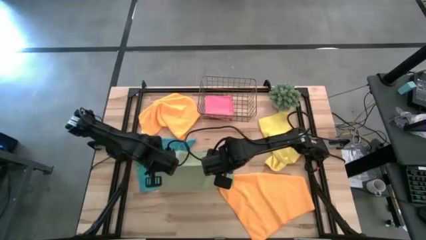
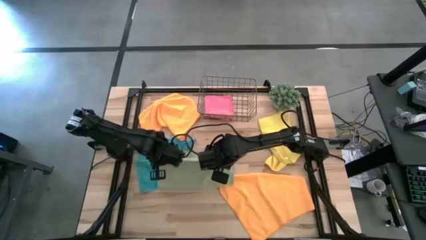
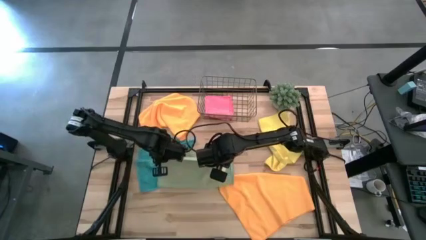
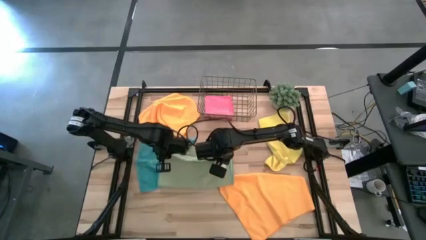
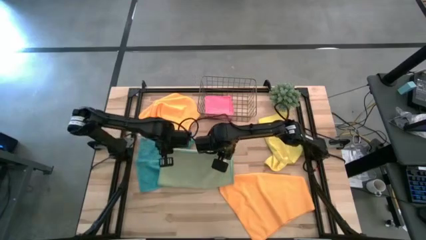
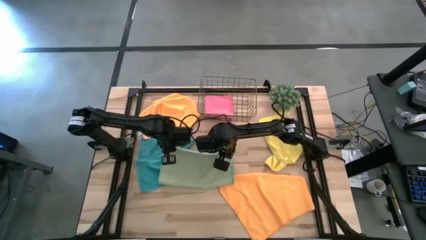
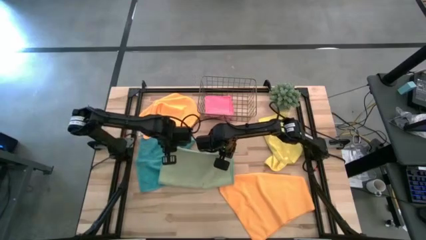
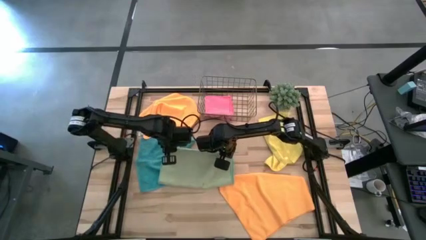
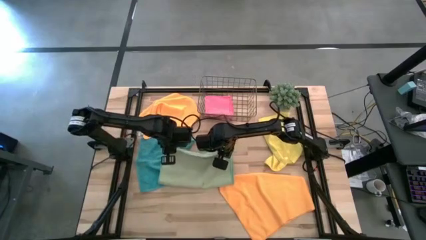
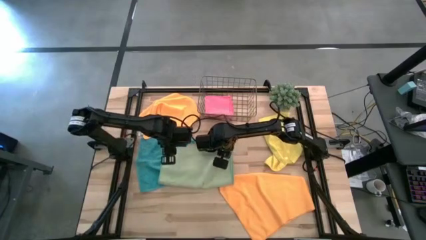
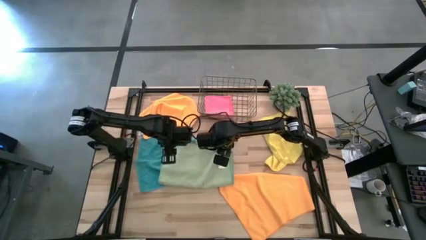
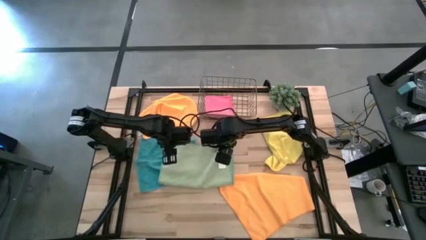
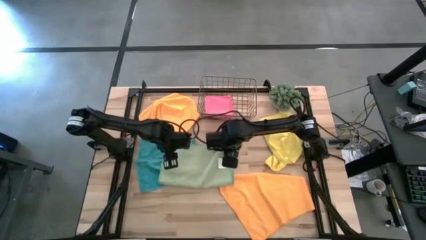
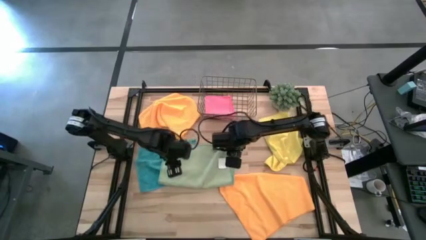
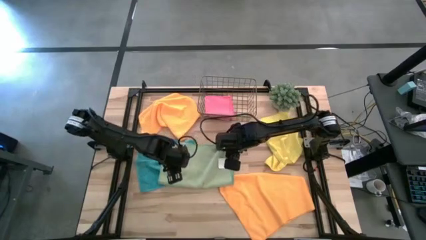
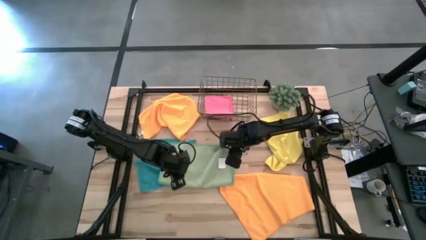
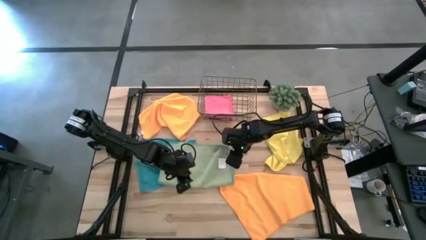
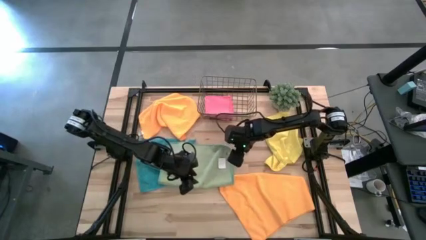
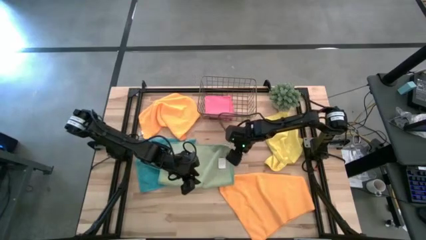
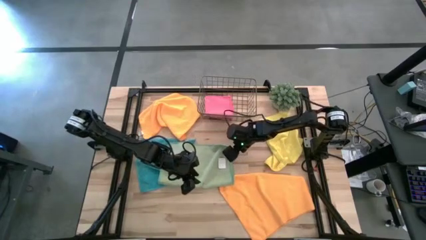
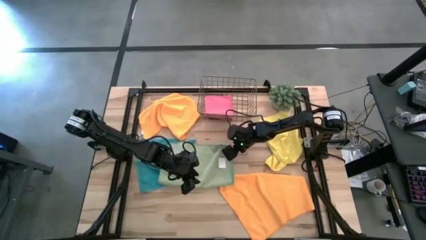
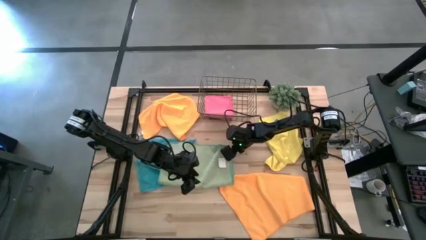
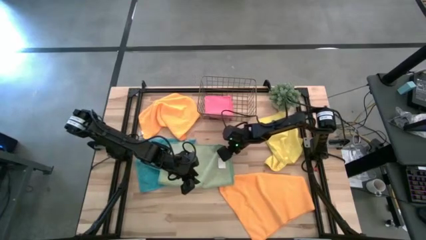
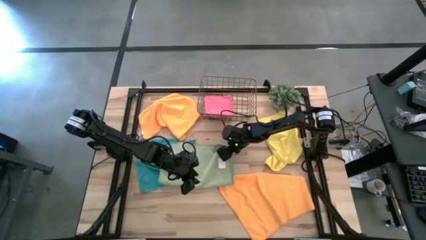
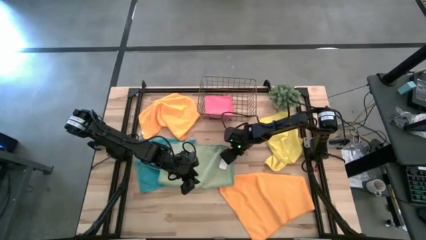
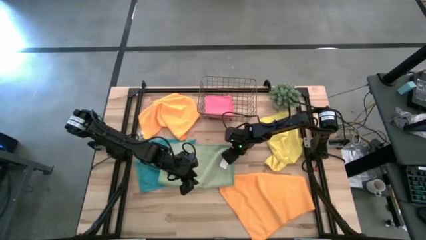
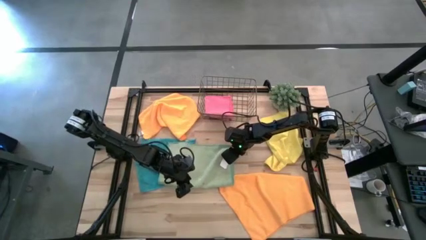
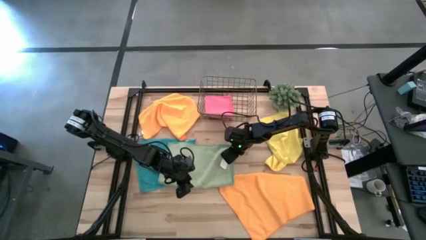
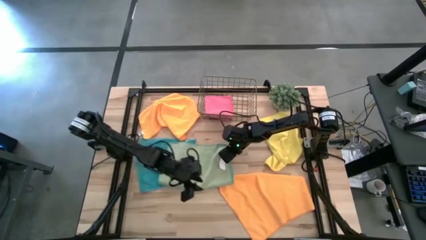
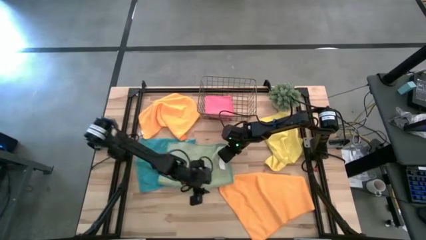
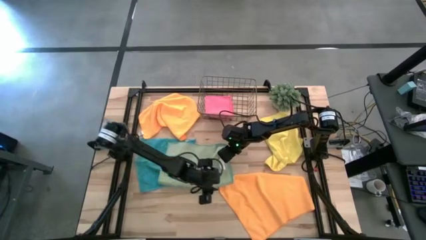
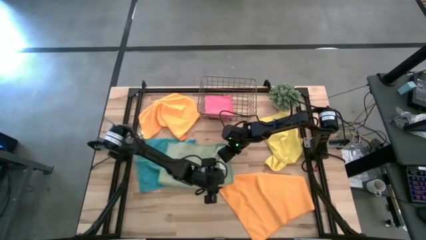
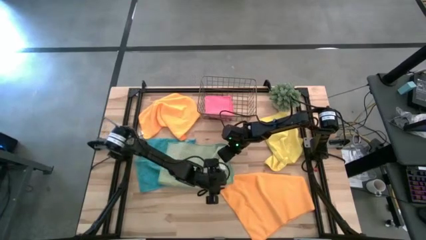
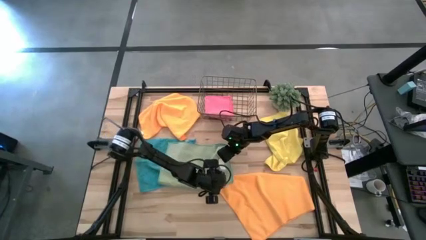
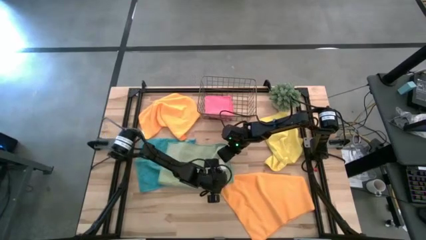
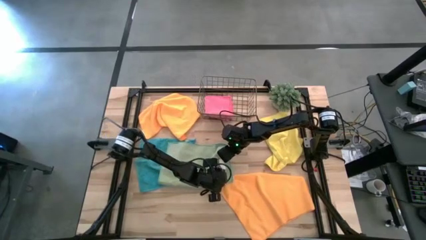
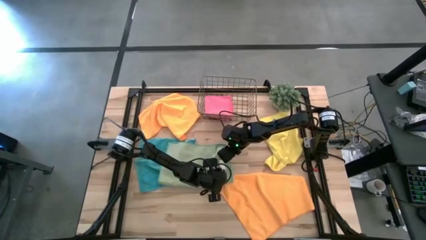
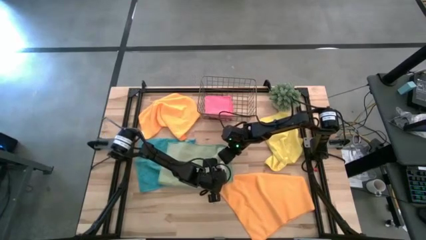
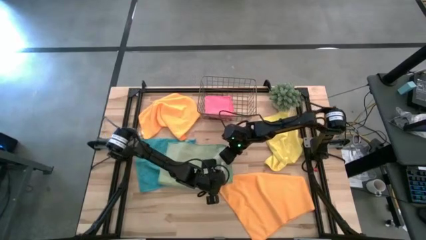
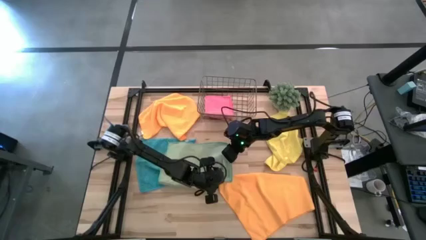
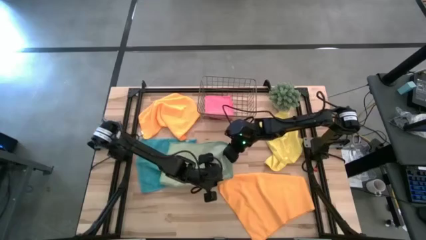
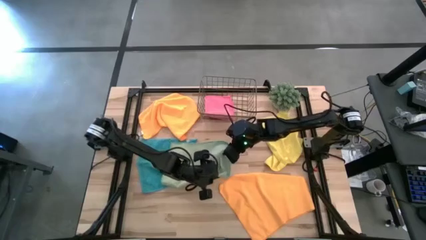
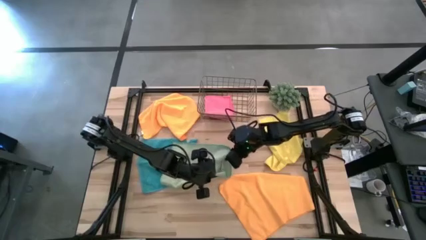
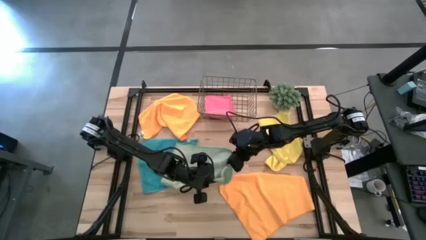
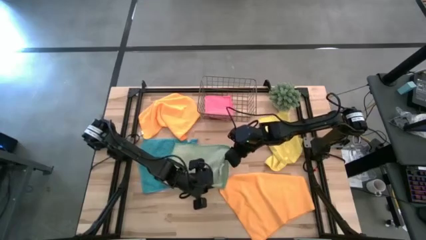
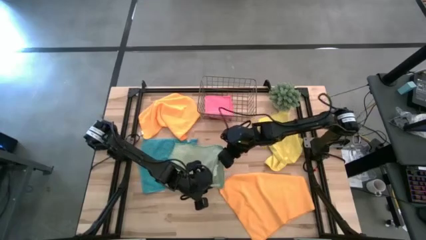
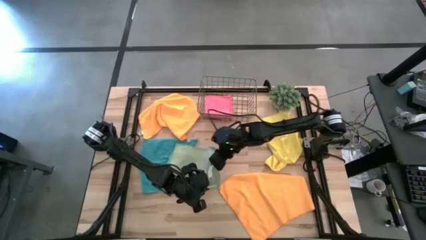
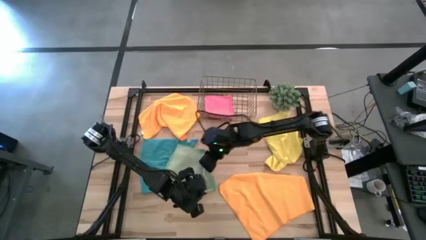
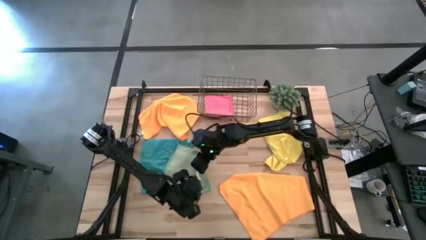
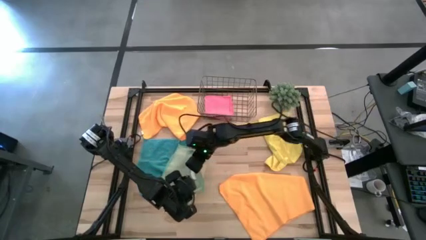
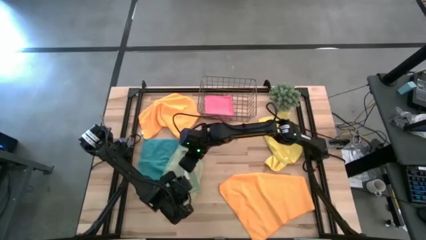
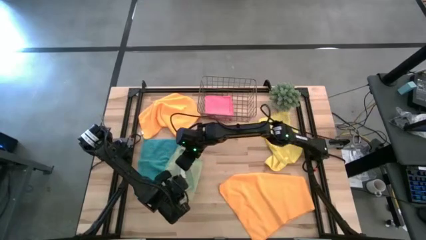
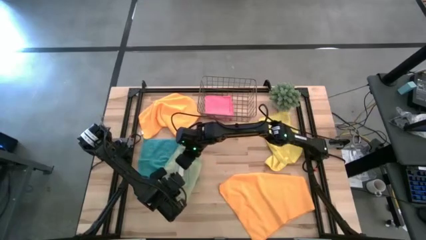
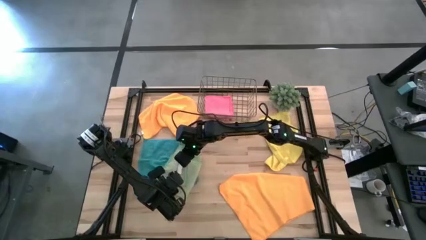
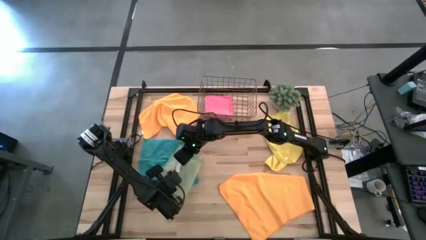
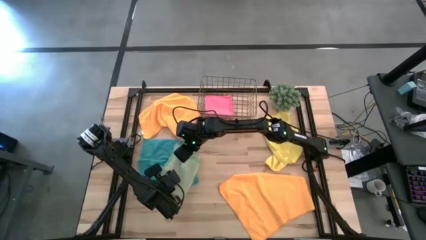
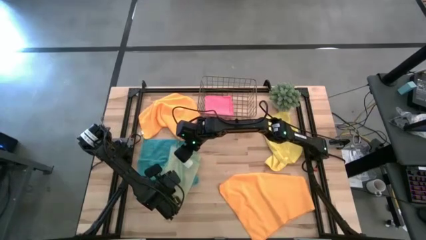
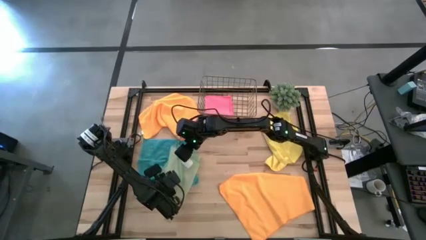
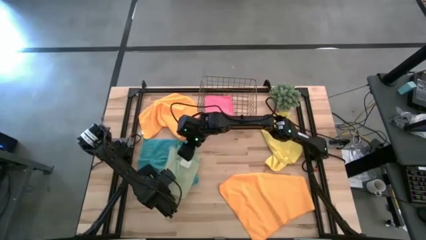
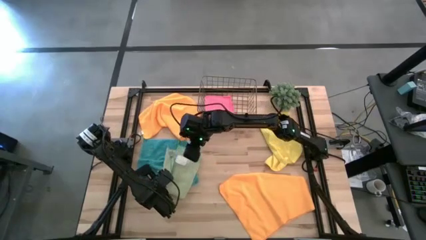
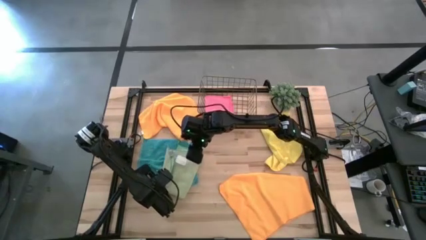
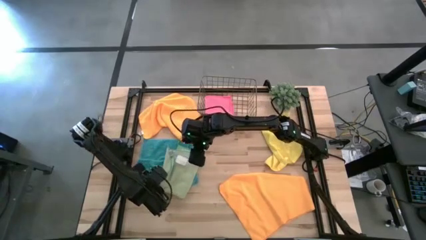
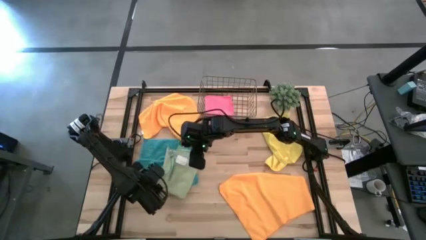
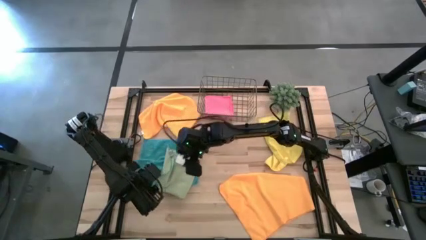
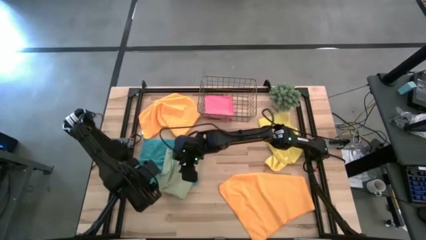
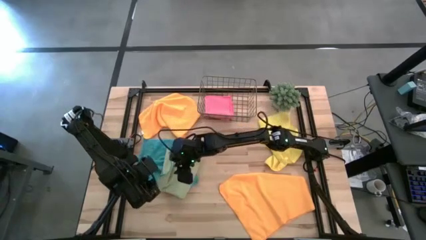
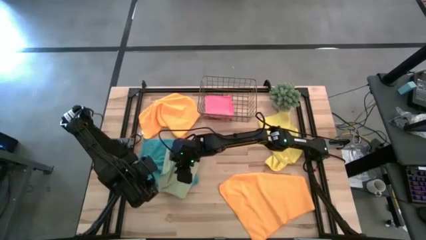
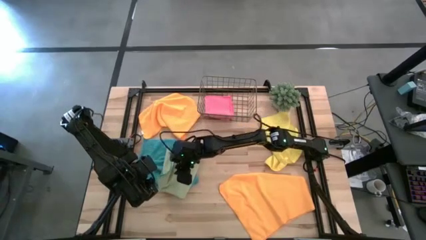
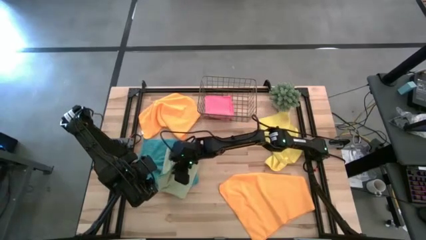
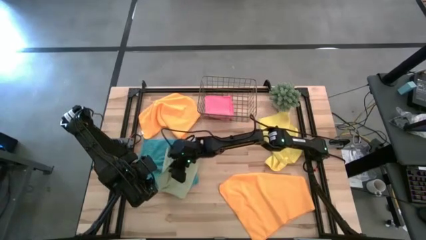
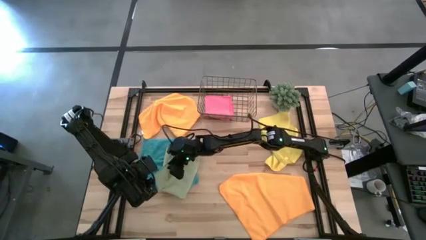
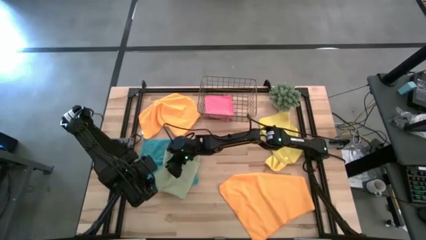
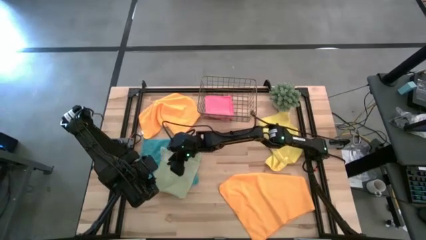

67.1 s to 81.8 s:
Task: Fold microfiber towels
Fold the green microfiber cloth

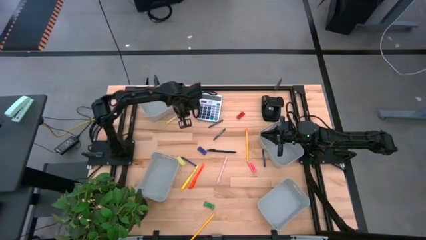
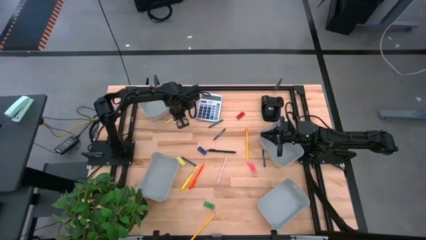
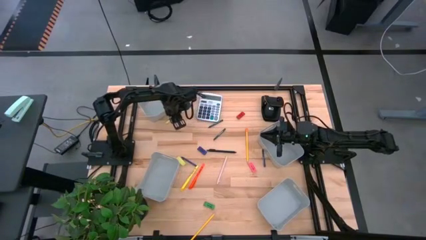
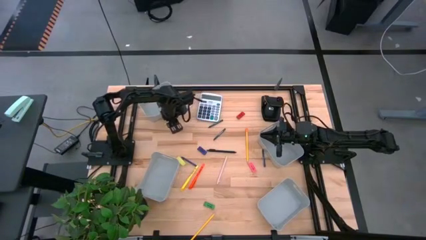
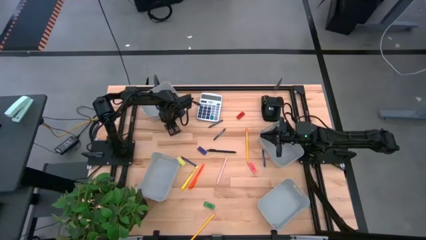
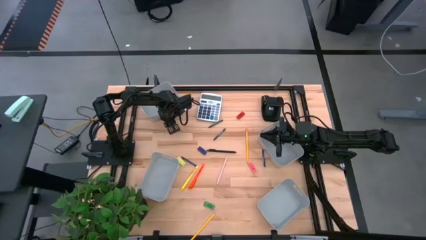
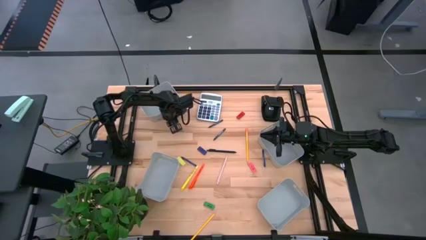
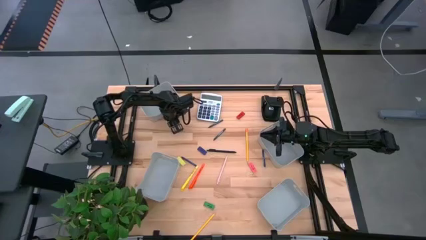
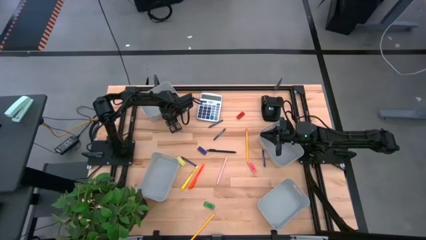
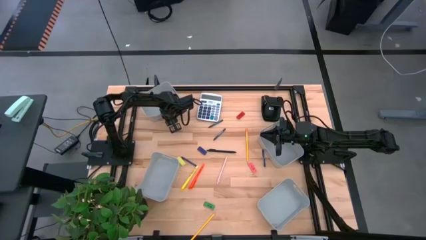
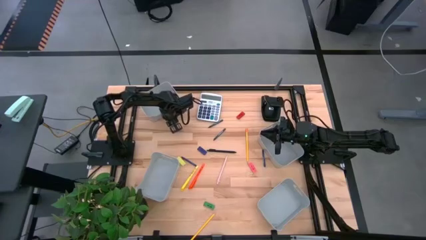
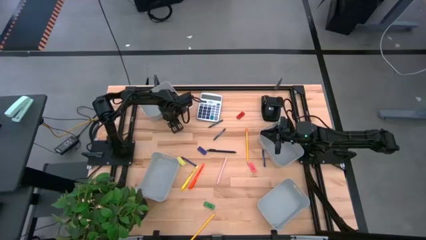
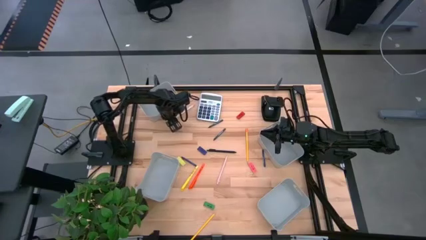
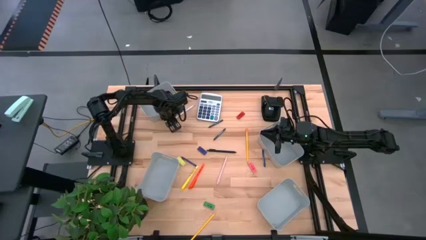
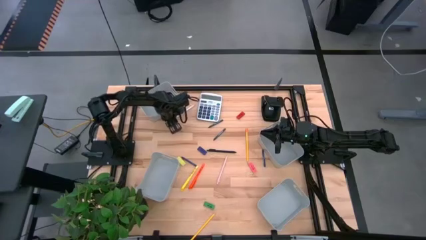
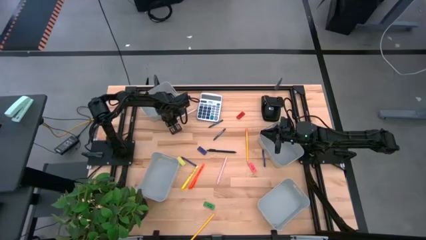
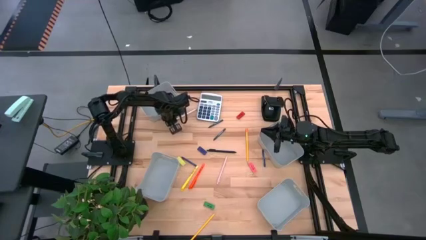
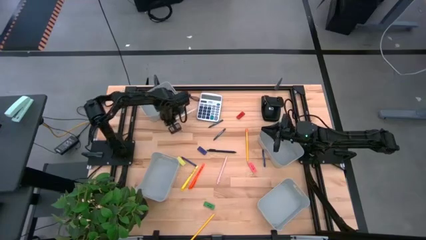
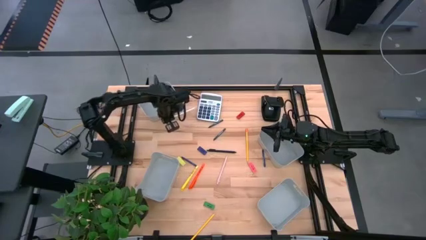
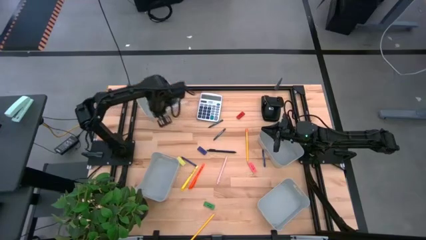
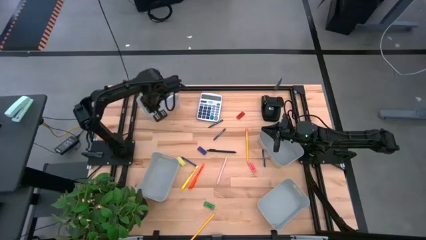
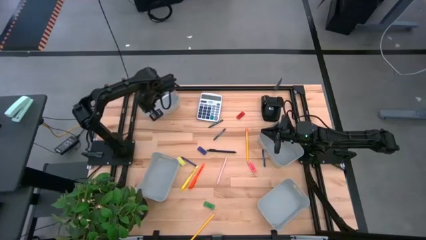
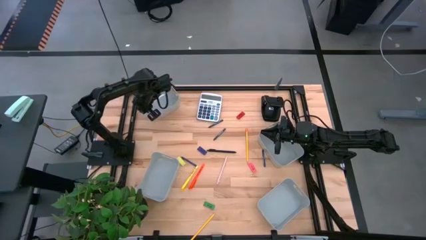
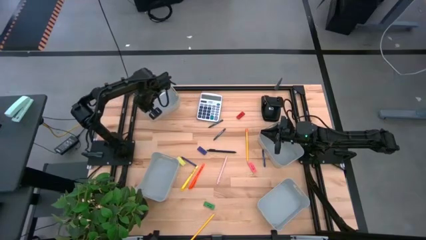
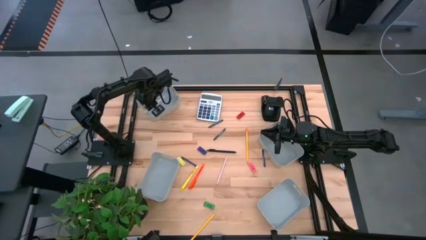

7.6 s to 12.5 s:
Task: Sort crayons/erasers/pens/pencils in bins
Put the white pencil into the top left gray bin
